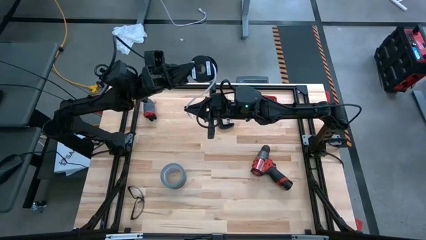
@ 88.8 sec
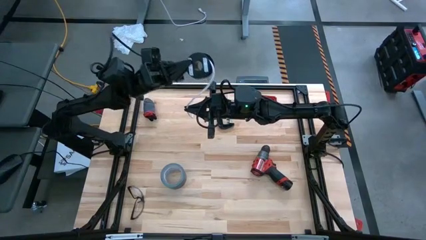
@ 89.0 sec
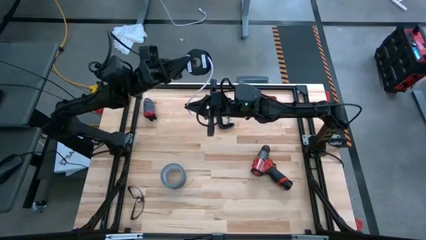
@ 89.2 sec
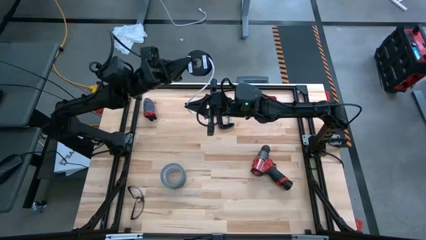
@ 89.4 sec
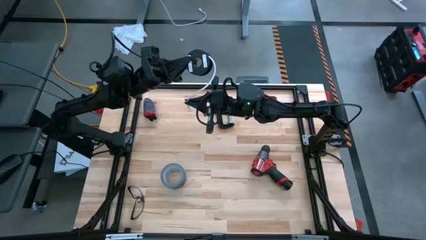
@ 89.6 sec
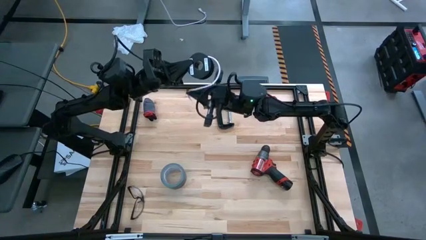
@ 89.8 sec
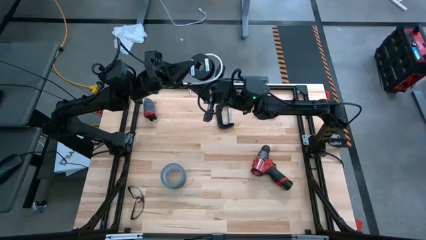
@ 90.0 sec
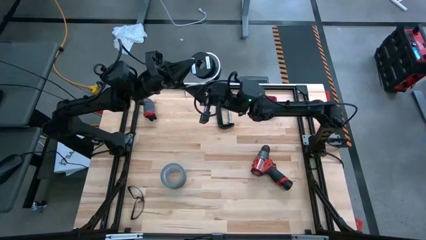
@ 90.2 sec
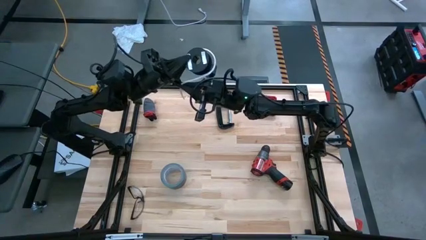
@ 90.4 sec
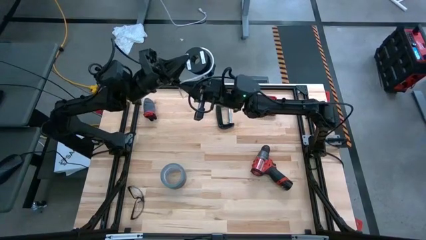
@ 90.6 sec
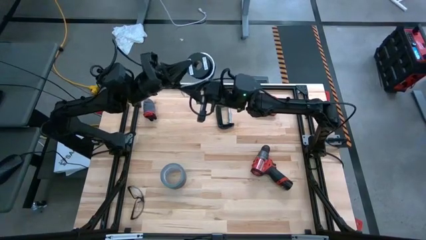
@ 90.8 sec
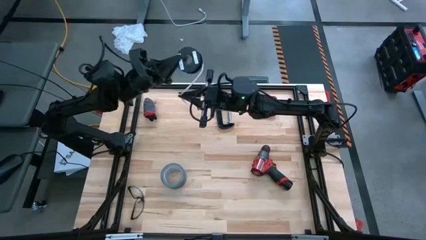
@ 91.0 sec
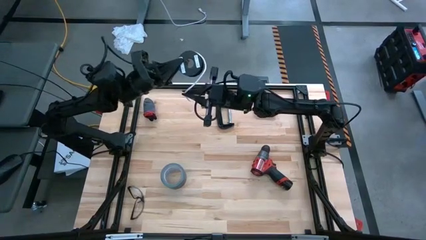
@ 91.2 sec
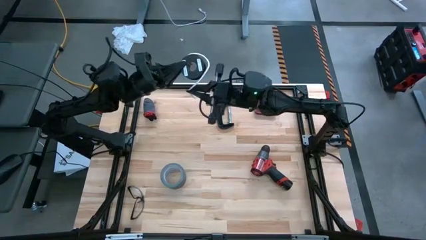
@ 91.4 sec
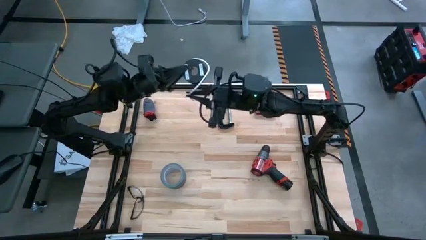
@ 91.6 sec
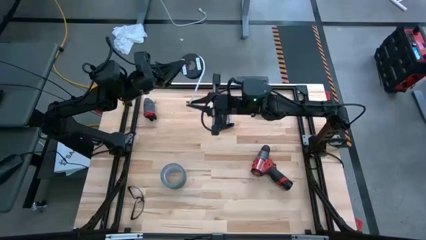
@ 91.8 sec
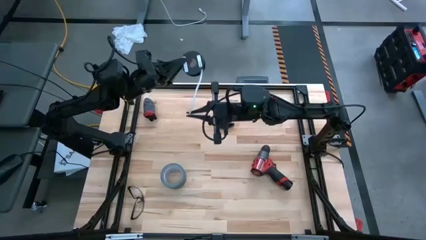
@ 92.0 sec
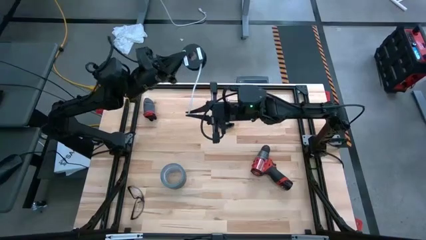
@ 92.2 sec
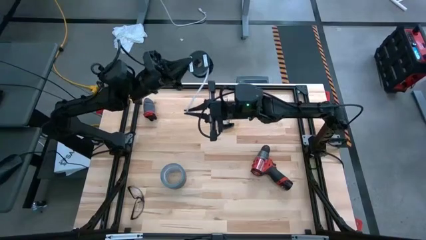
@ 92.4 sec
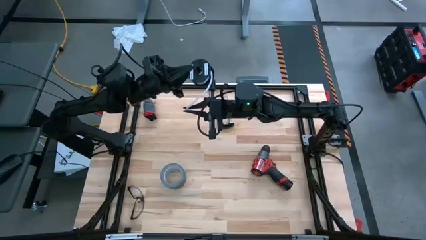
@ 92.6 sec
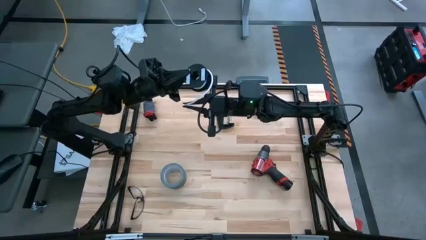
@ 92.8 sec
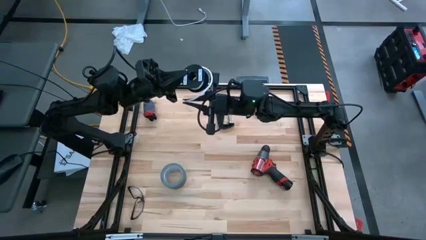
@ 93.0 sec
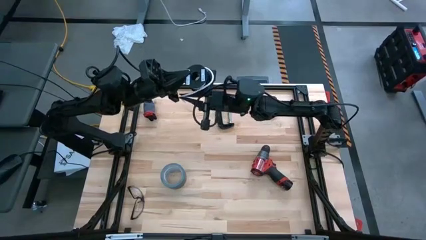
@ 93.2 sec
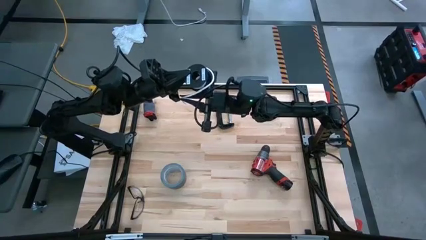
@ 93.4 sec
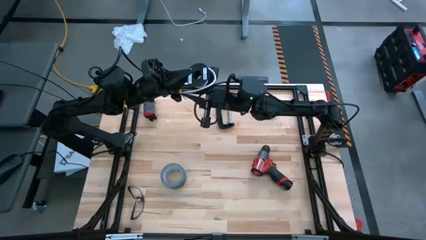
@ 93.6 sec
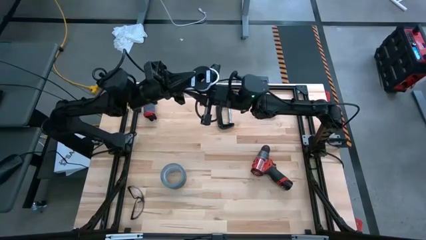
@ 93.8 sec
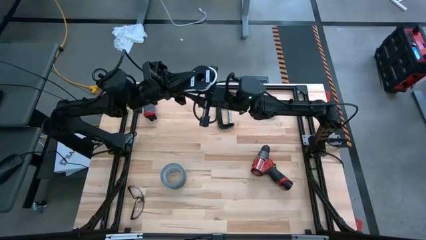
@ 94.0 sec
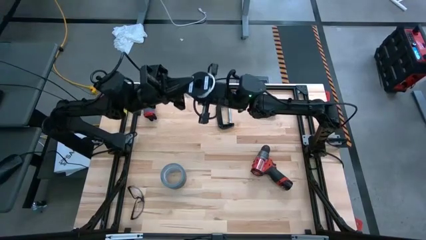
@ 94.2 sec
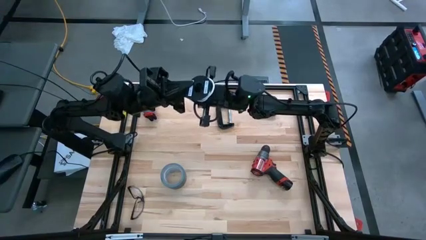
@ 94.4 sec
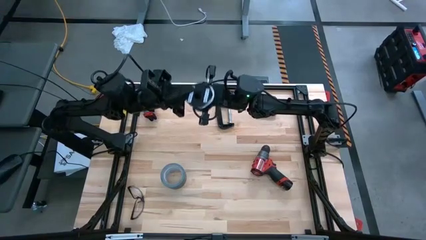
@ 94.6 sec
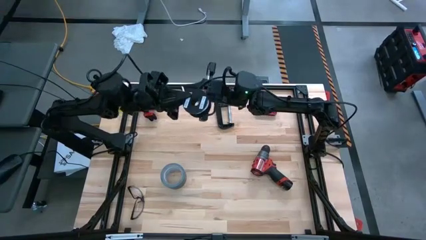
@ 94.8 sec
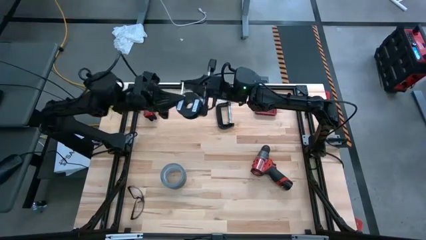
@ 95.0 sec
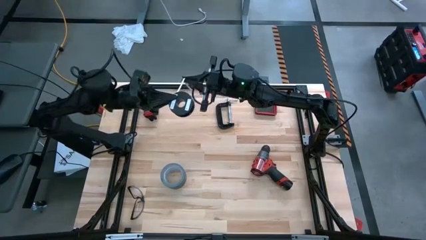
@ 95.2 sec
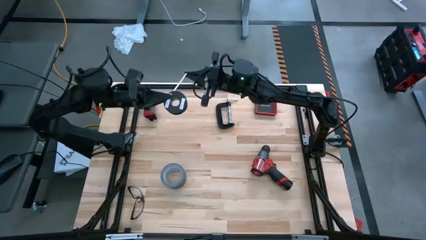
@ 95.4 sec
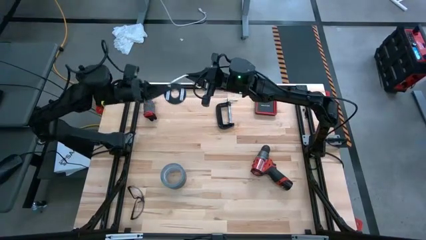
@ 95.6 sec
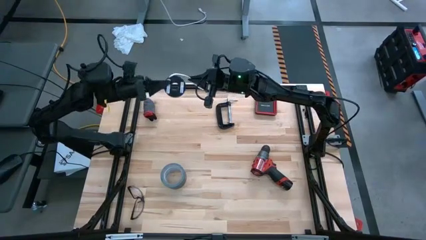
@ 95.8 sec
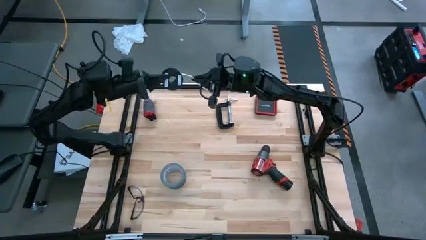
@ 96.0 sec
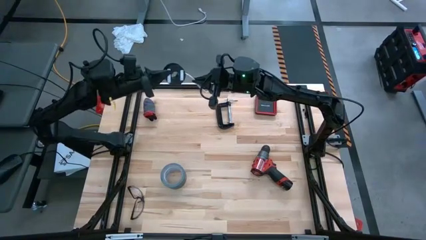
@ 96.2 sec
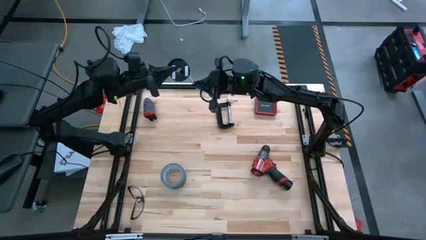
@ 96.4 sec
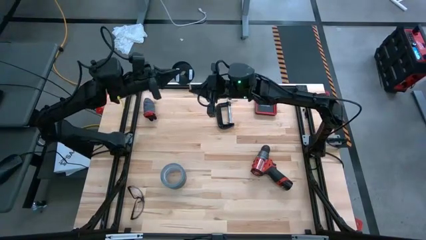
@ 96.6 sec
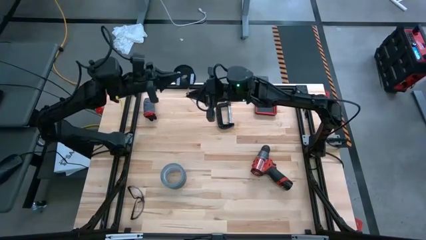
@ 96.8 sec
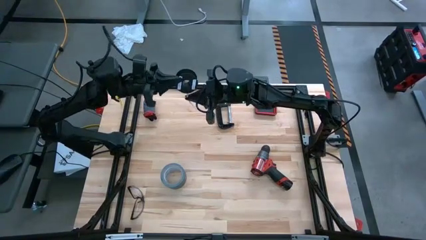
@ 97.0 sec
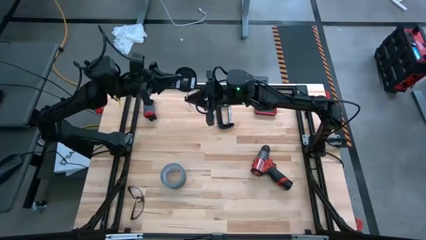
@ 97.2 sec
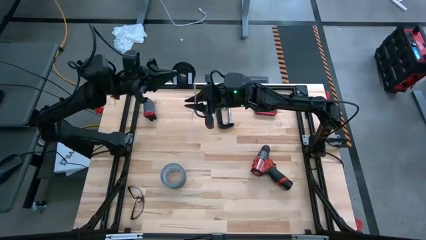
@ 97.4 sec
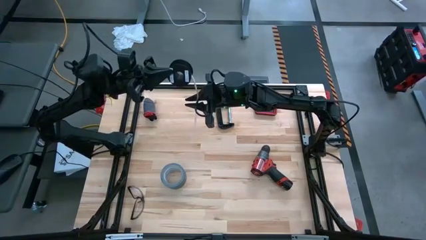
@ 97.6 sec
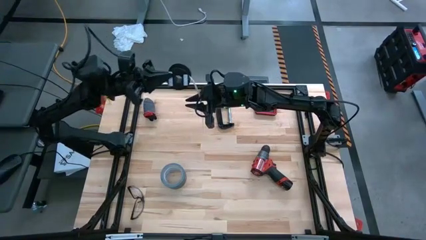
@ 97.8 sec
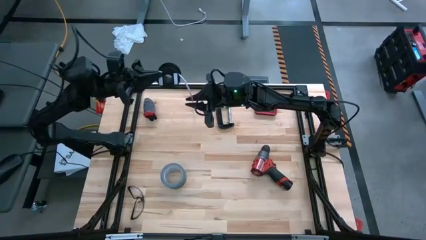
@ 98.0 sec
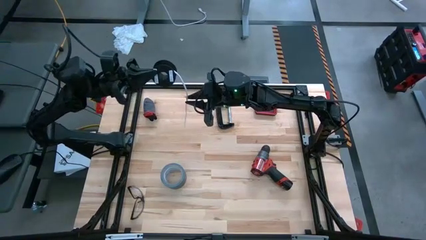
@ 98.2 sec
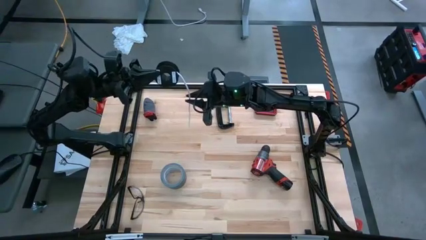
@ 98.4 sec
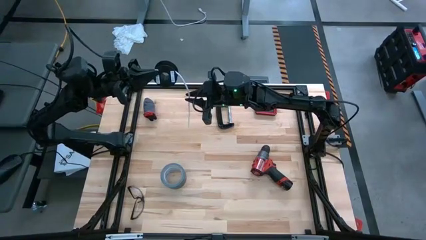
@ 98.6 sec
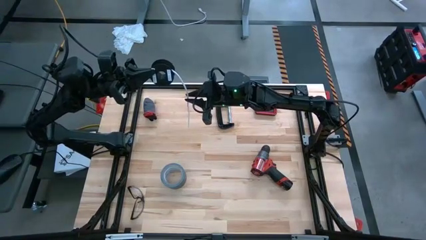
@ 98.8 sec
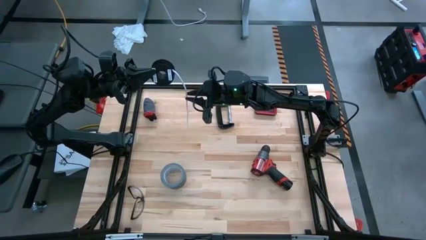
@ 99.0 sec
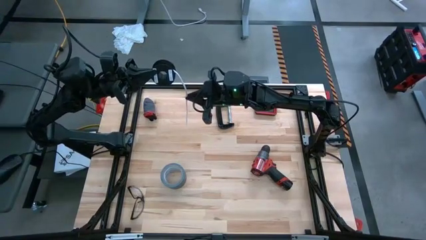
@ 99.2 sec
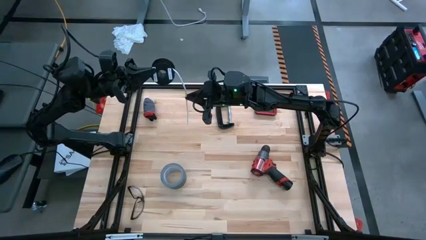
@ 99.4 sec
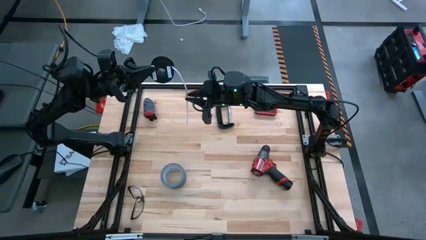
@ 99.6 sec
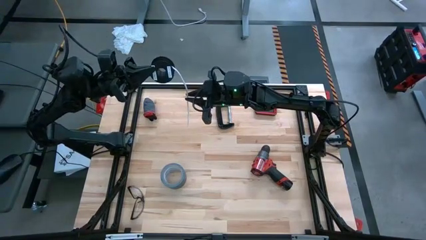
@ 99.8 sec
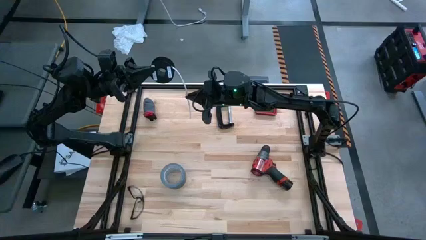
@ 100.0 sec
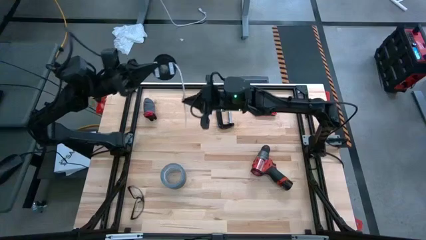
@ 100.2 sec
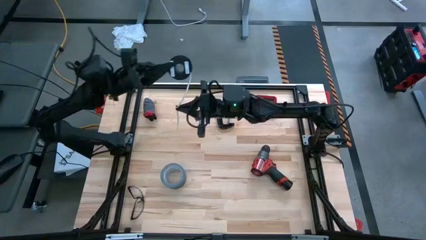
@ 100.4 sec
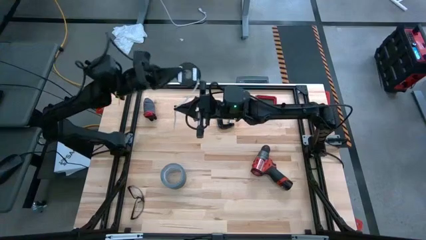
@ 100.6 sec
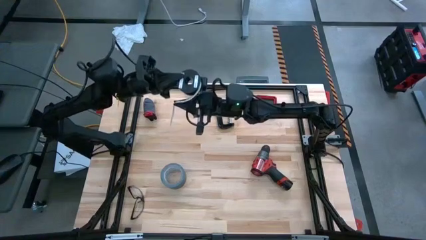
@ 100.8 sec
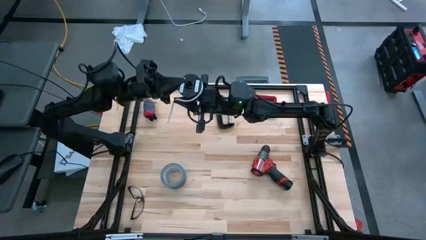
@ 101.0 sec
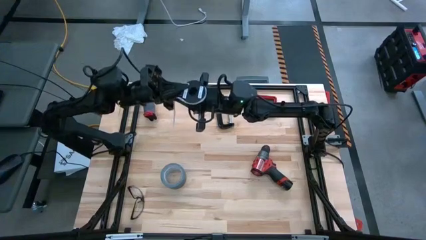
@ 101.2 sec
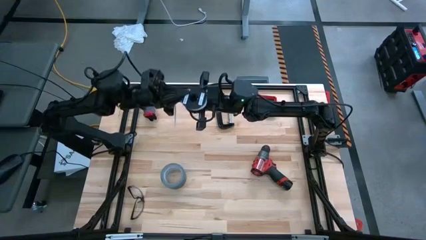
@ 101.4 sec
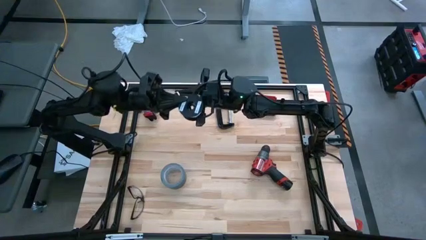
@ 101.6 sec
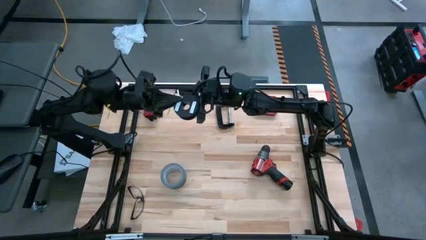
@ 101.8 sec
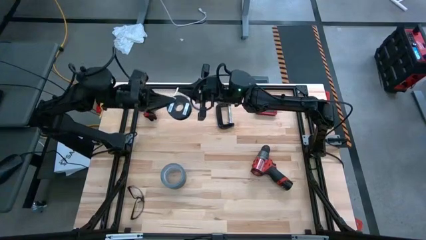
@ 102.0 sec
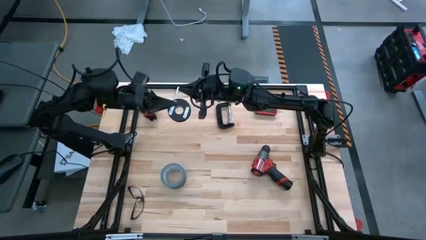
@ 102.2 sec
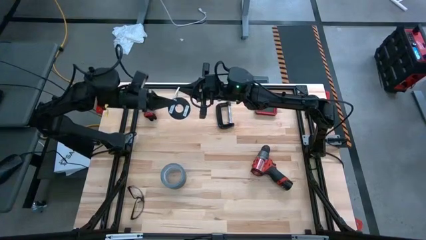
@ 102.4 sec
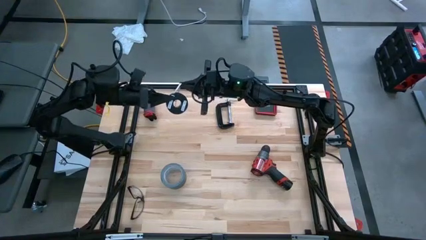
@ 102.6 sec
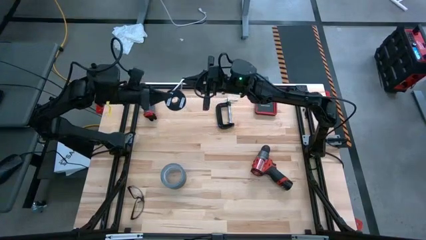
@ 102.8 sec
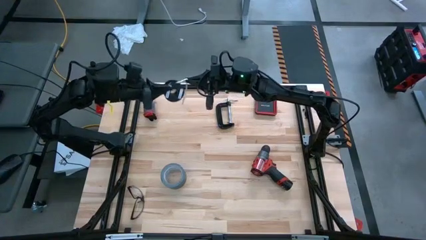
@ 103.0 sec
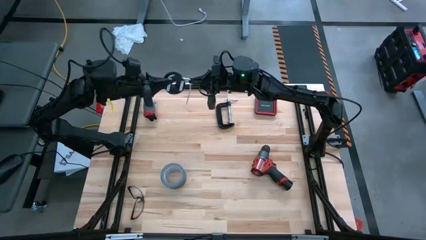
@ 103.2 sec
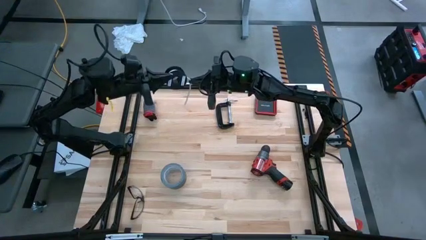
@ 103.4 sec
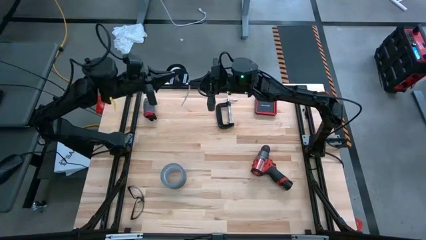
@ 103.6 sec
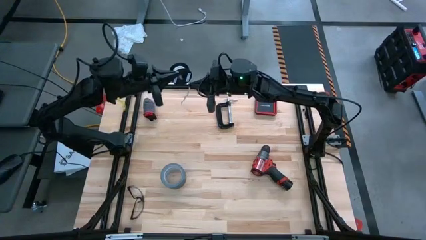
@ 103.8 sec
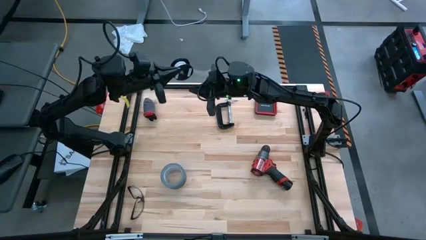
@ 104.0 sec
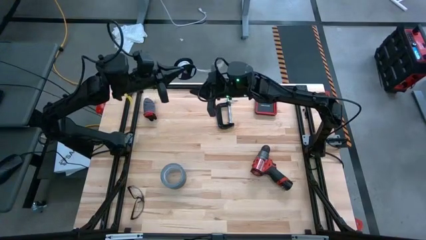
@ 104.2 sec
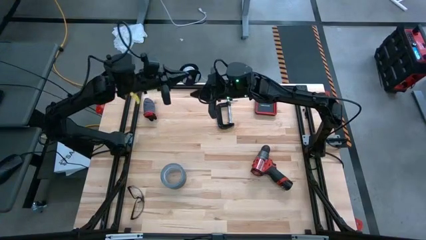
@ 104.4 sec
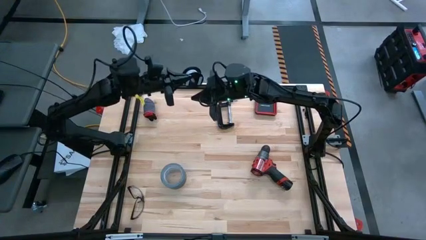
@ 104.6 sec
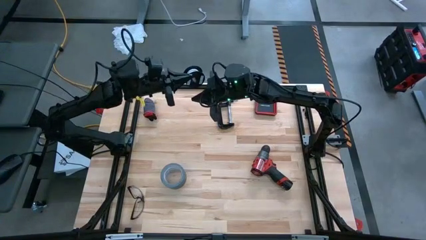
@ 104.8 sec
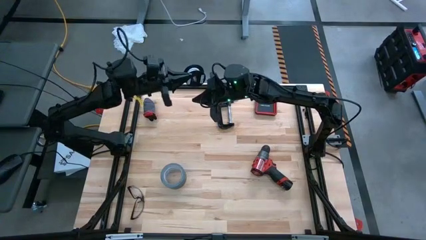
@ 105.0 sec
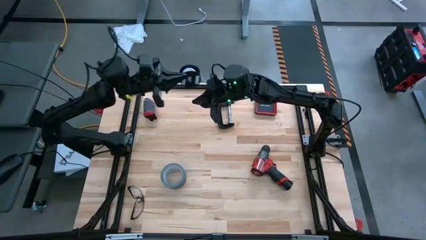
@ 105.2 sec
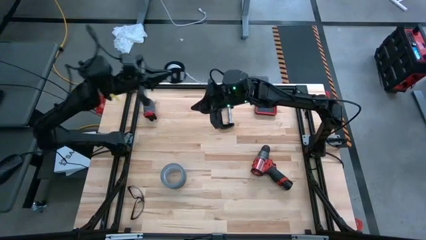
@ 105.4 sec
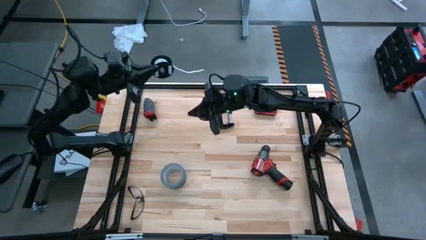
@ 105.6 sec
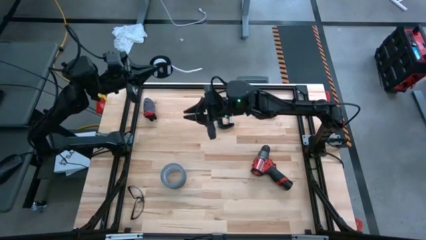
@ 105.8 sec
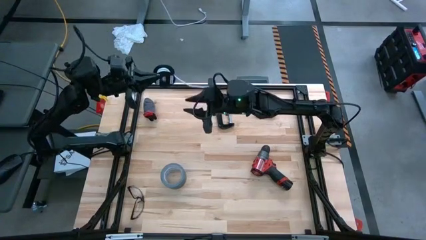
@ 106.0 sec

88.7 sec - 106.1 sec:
Task: Coil cords
Coil the white wire onto the black spool
